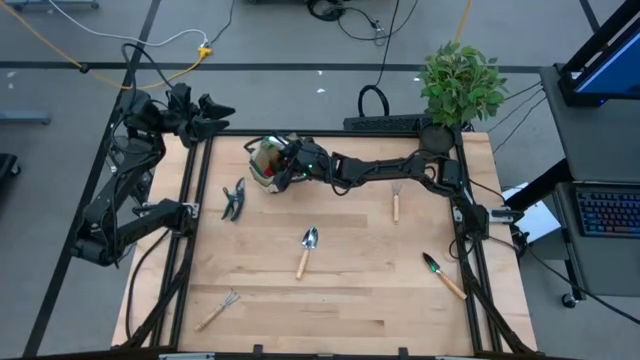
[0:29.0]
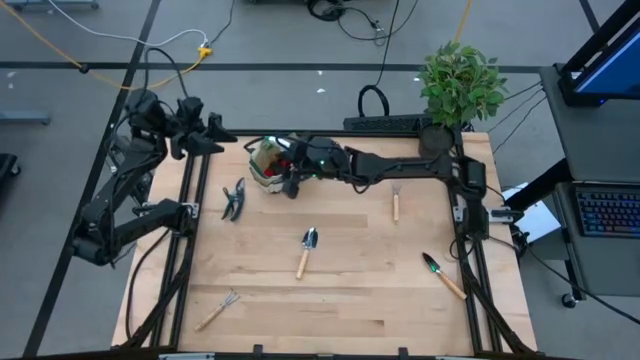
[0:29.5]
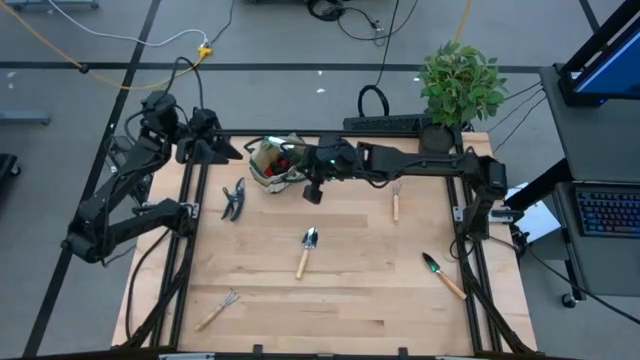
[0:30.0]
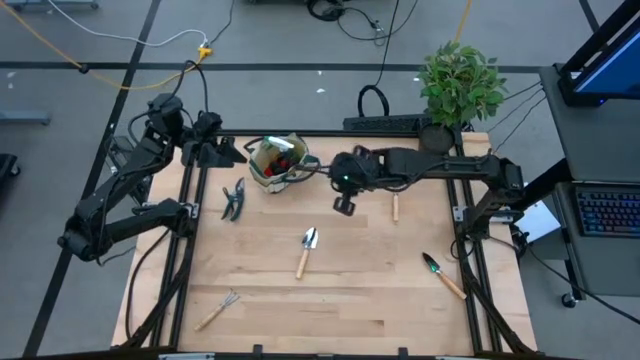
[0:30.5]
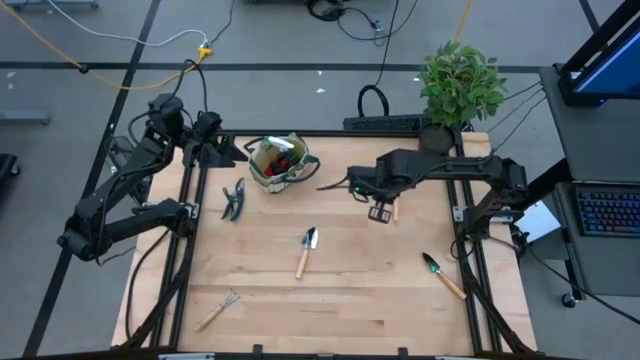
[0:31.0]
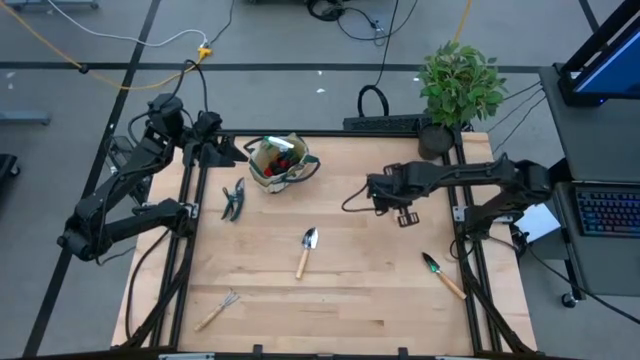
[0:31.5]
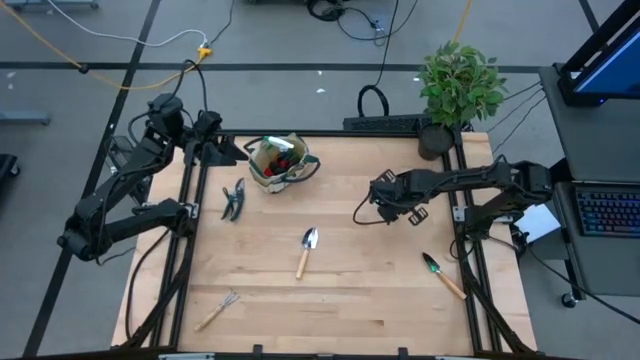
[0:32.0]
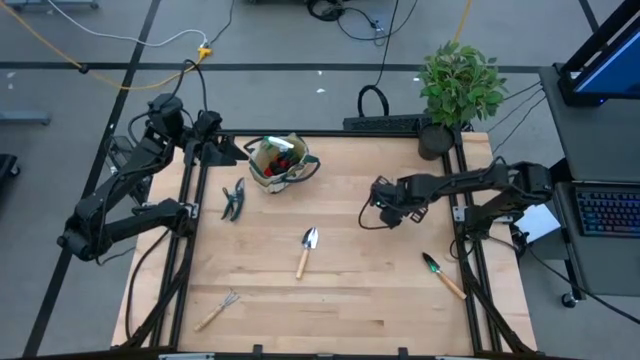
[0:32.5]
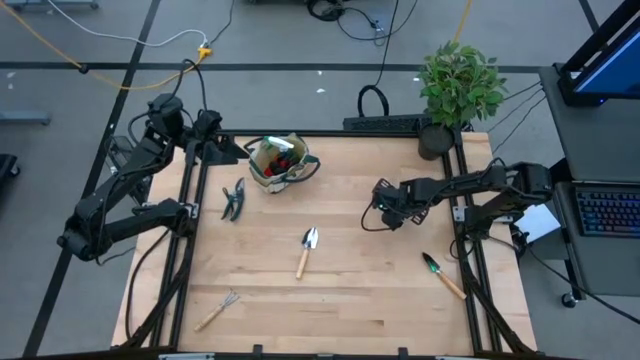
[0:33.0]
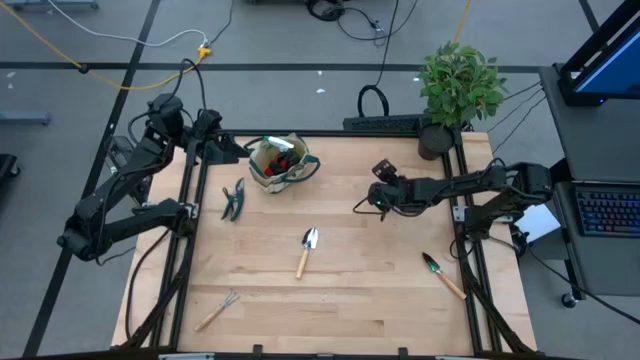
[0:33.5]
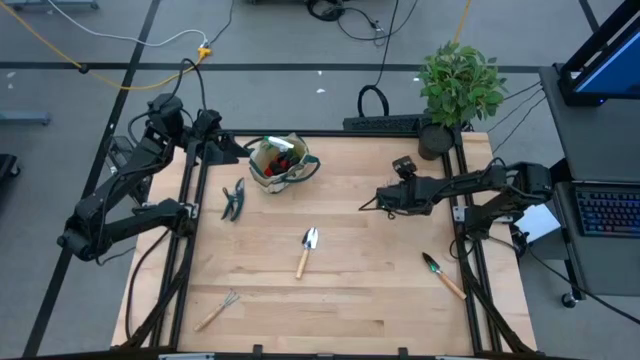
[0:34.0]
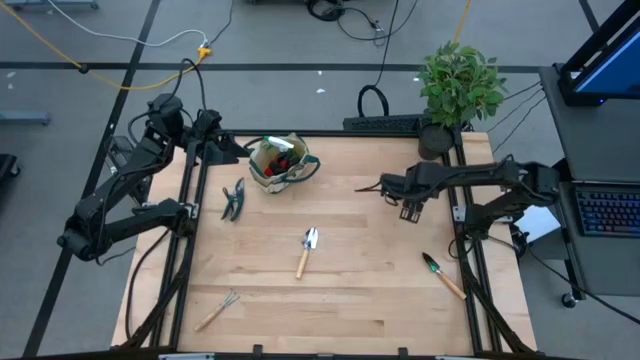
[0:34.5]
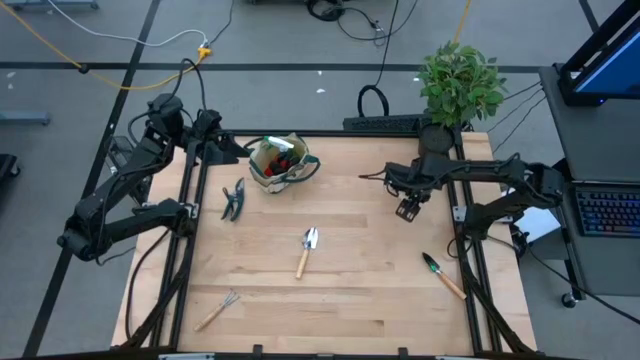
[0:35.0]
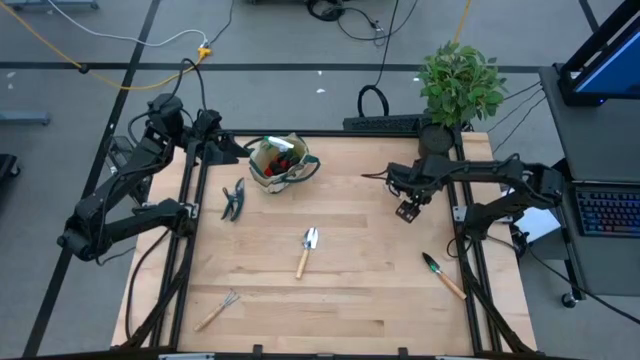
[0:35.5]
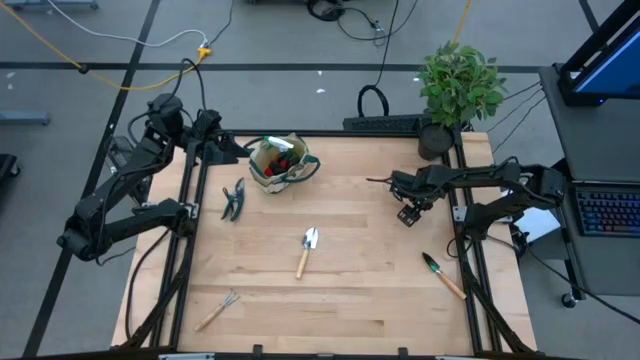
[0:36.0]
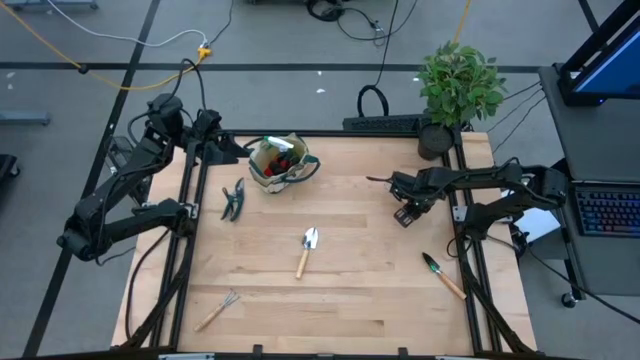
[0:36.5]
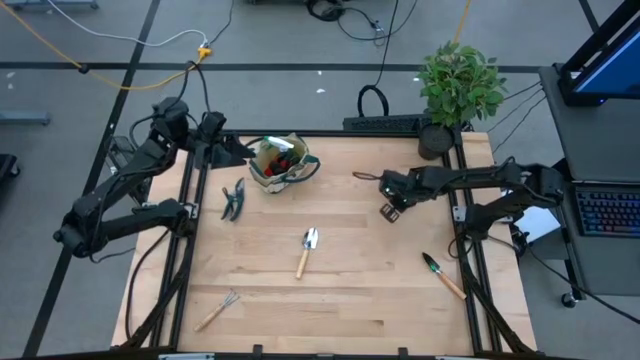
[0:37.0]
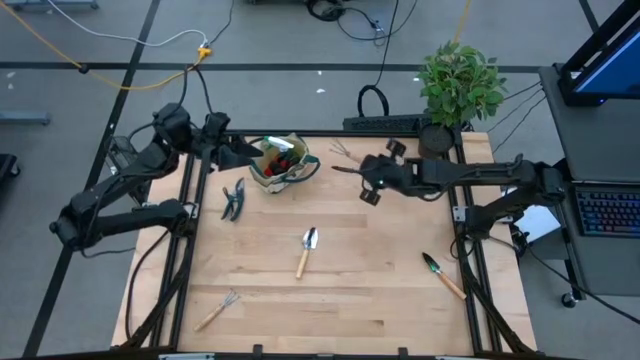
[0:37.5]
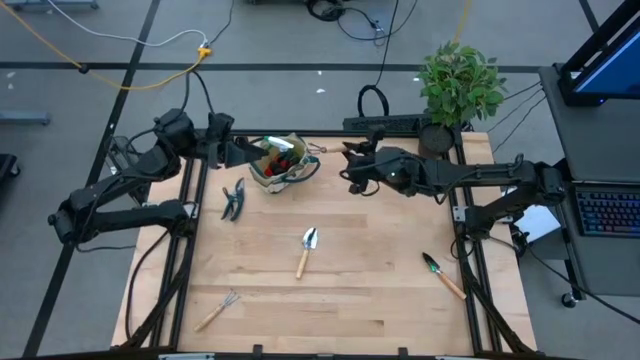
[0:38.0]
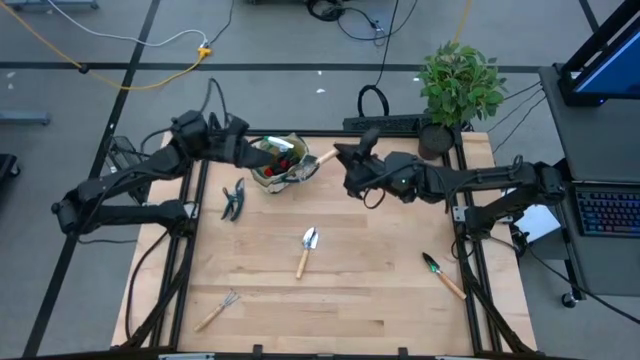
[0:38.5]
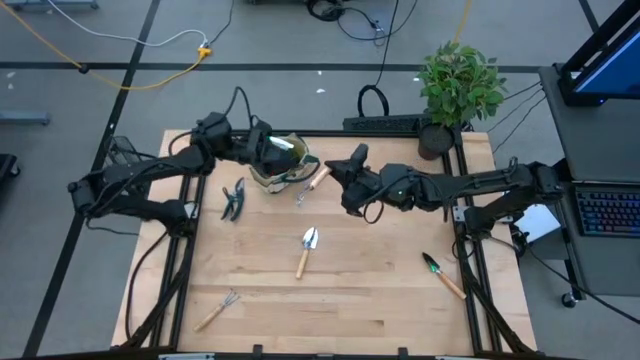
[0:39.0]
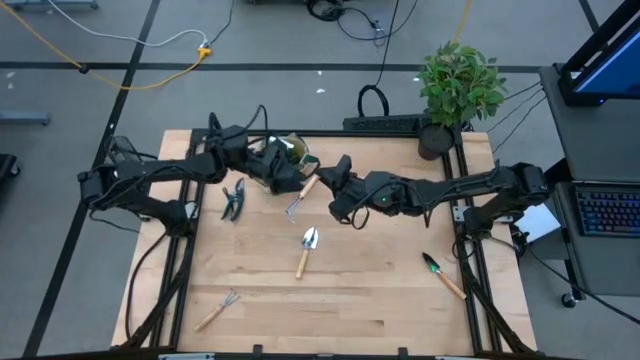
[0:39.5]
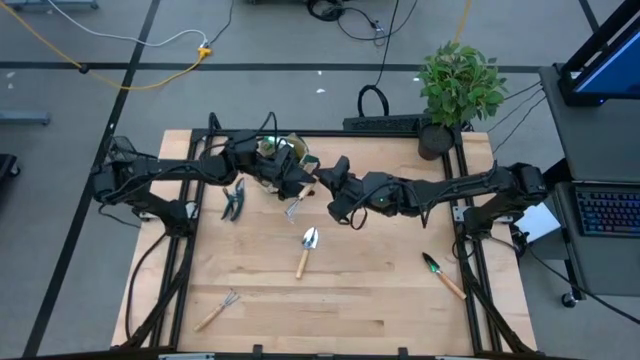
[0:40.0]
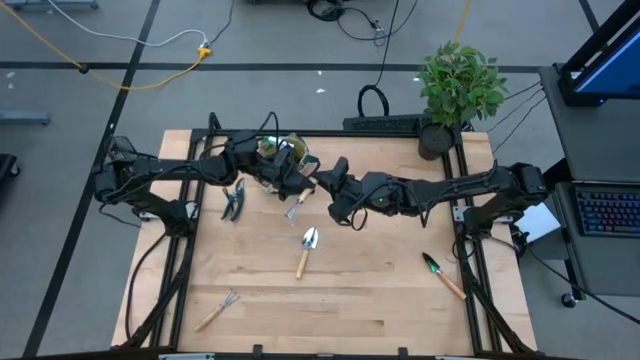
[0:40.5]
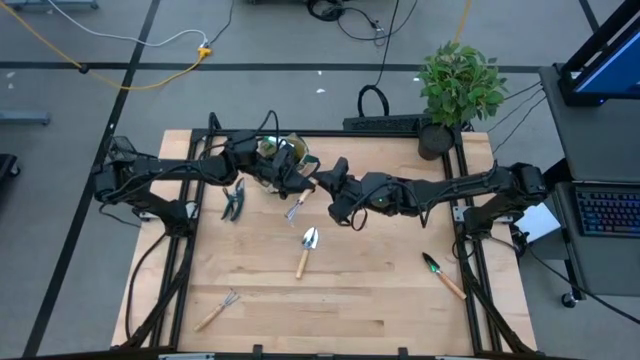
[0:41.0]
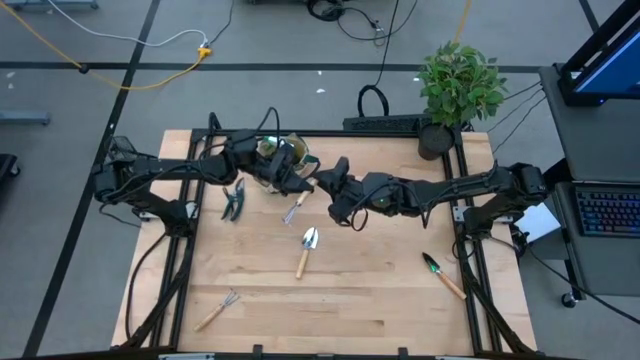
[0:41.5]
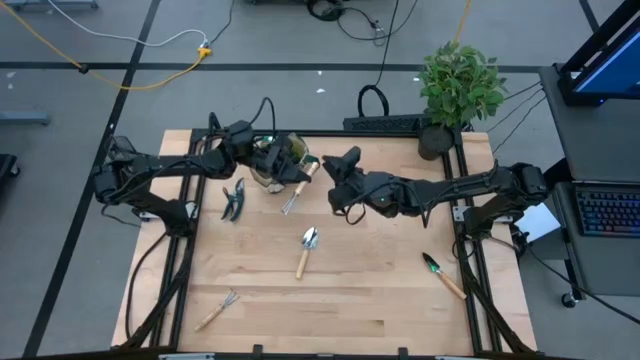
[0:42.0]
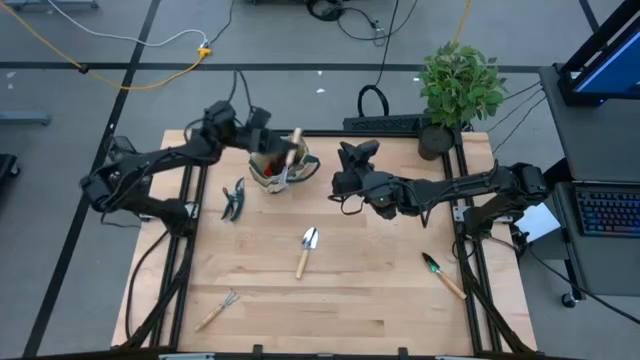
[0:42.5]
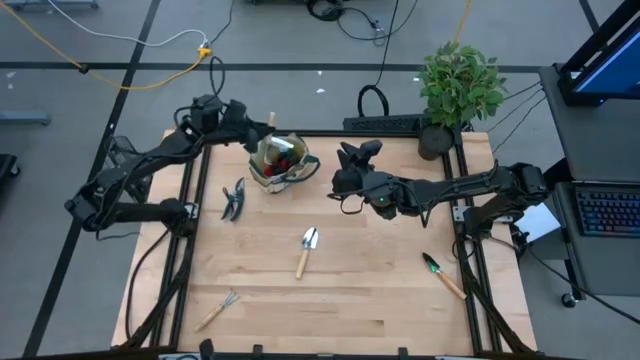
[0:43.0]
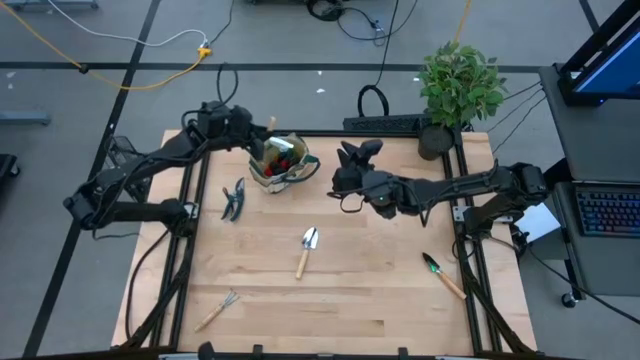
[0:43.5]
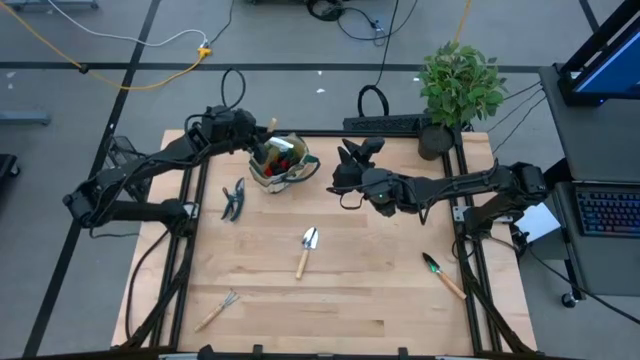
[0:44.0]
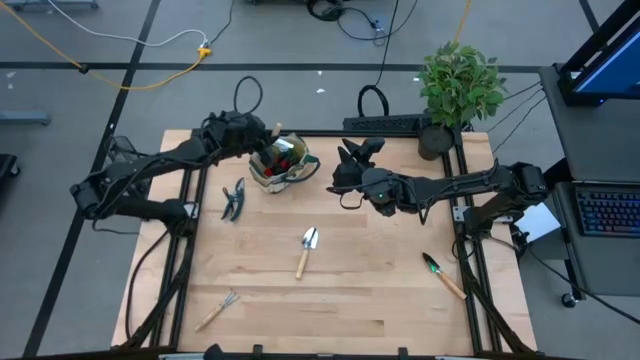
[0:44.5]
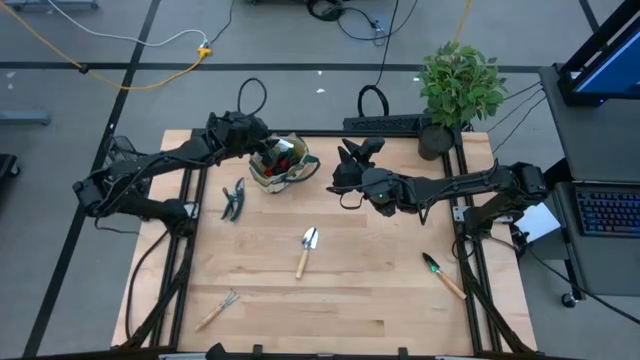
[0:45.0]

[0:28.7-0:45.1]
Task: Pick & Place Garden tools in Gardening bag
Put the top hand rake into the gardening bag

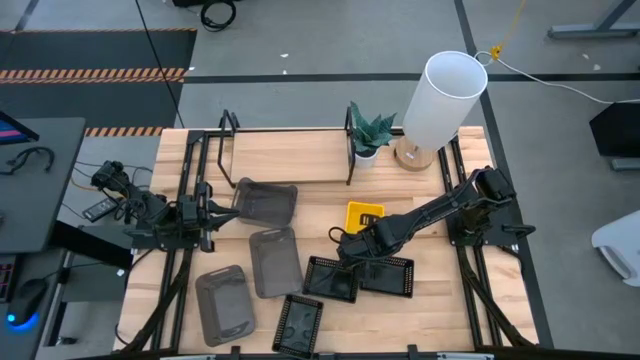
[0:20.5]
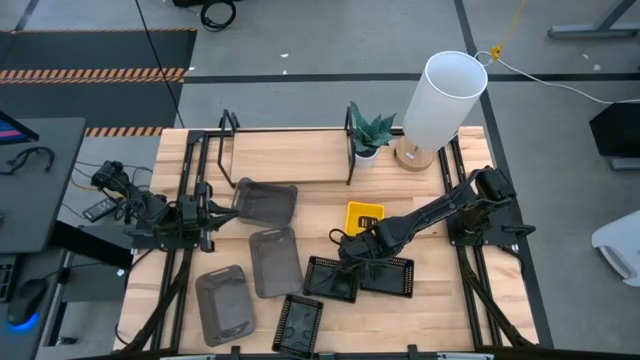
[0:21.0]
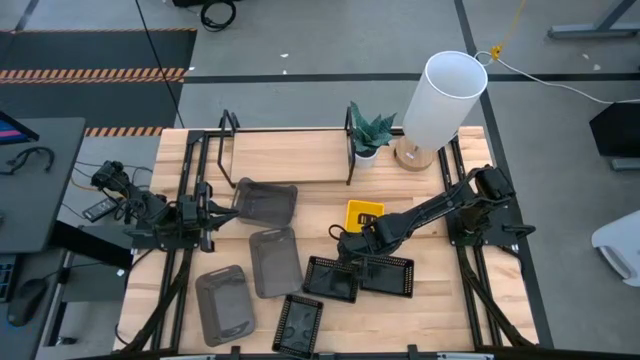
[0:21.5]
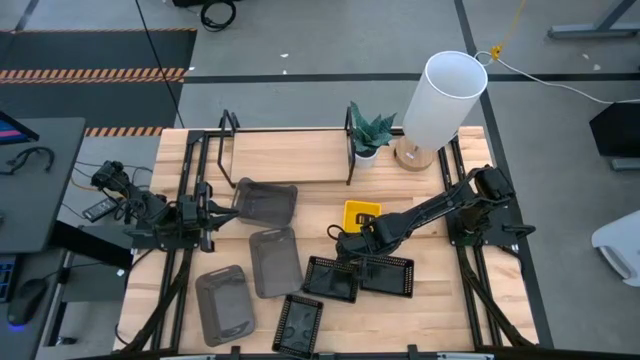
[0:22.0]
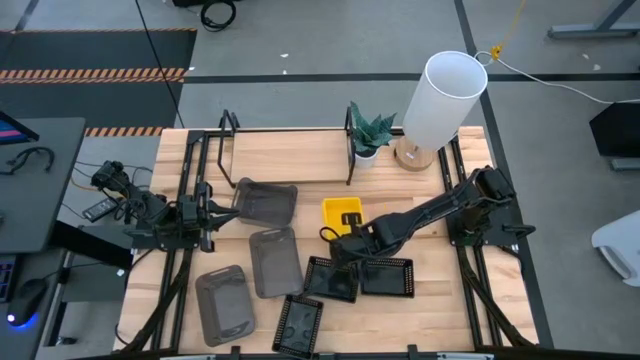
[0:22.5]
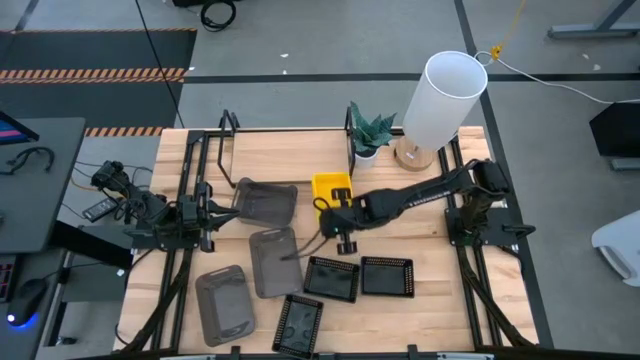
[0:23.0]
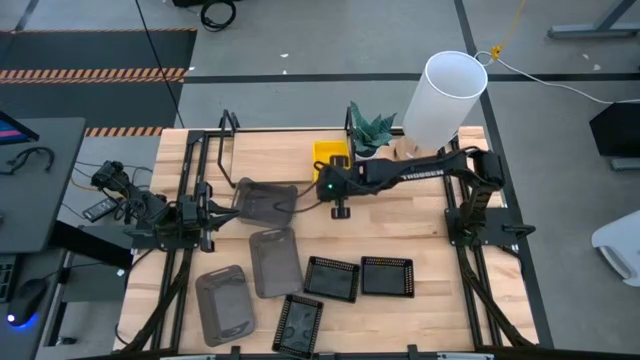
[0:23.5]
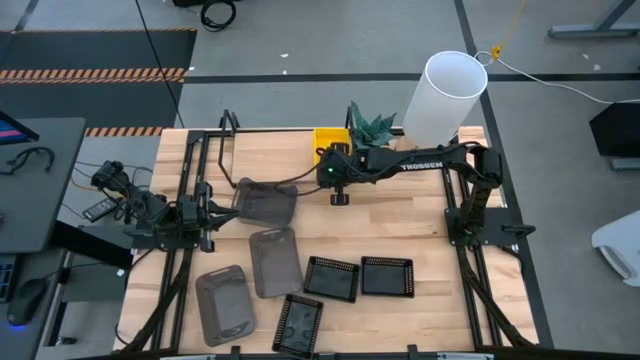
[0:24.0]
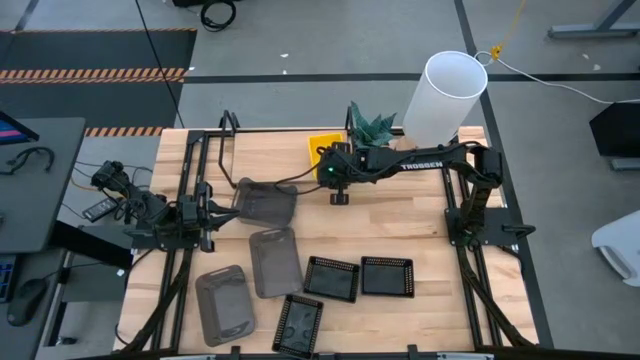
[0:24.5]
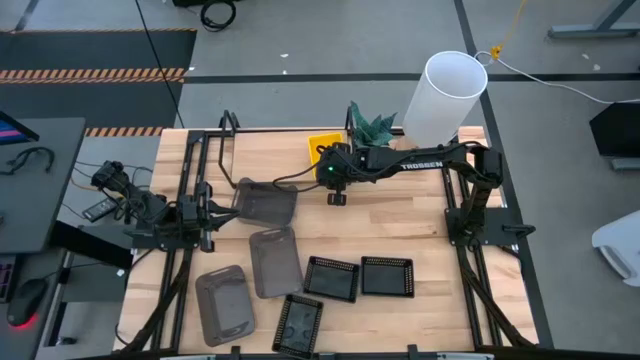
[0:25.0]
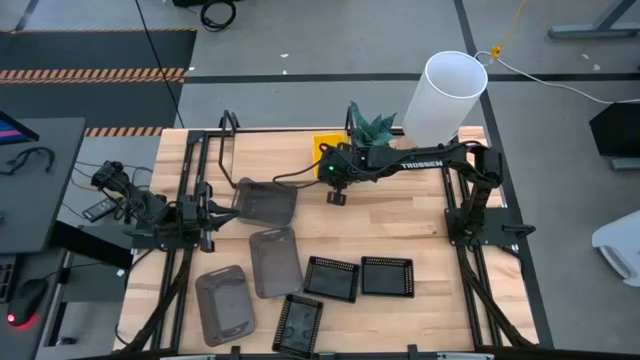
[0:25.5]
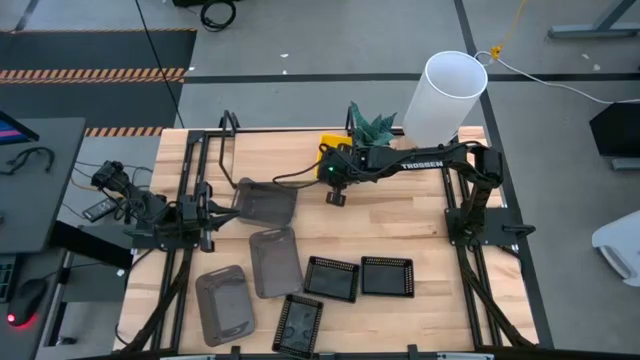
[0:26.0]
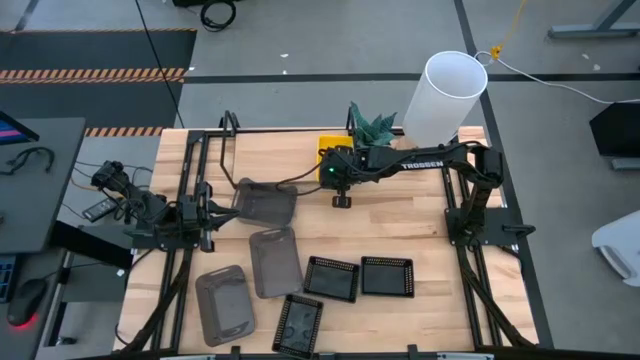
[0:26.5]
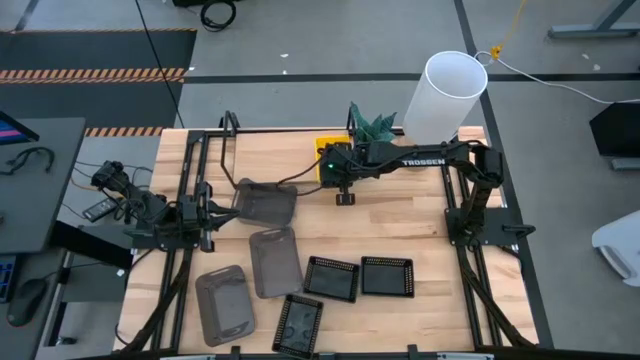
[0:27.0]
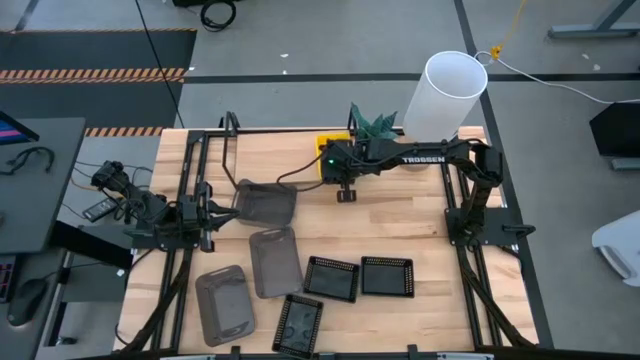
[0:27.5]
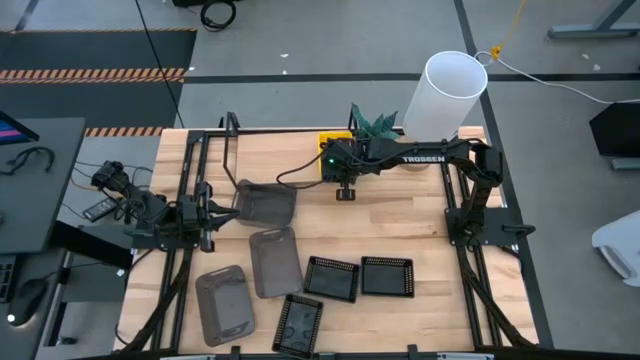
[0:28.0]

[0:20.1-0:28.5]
Task: Stack baskets on shelf by color
Put the stacked yellow baskets on the shelf
